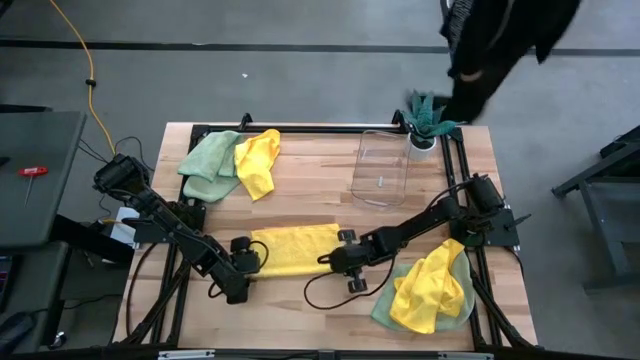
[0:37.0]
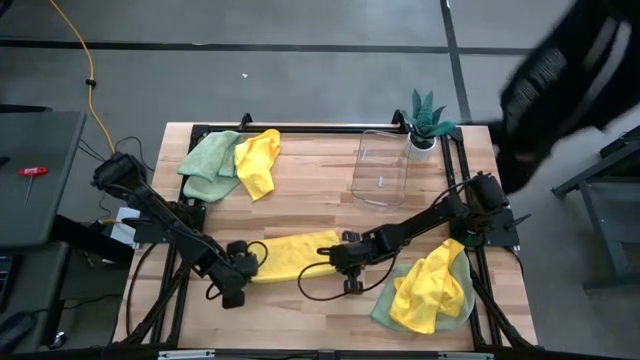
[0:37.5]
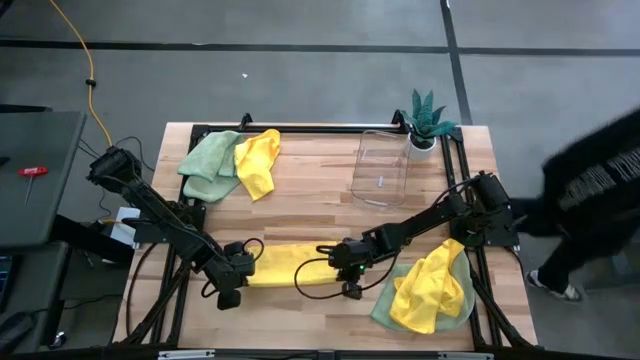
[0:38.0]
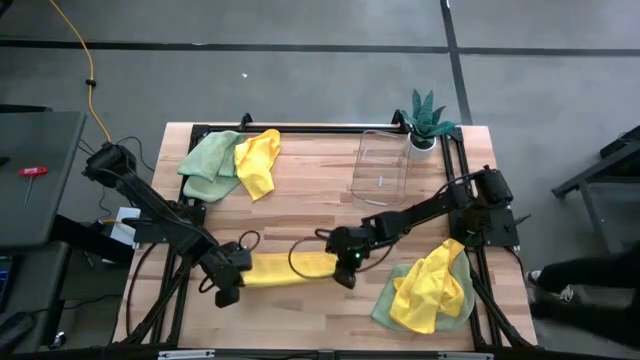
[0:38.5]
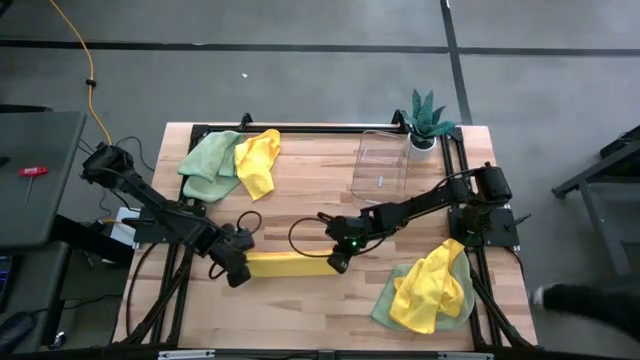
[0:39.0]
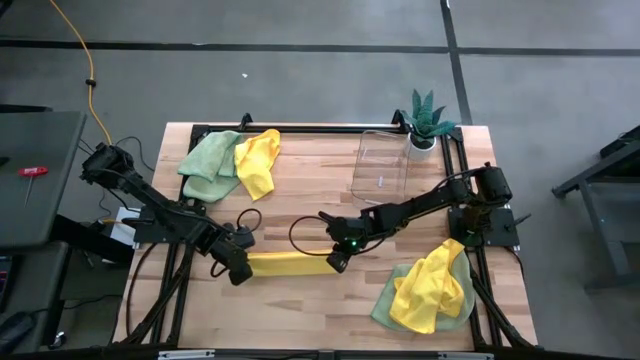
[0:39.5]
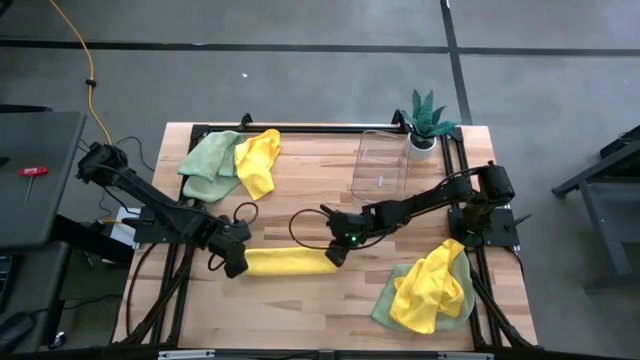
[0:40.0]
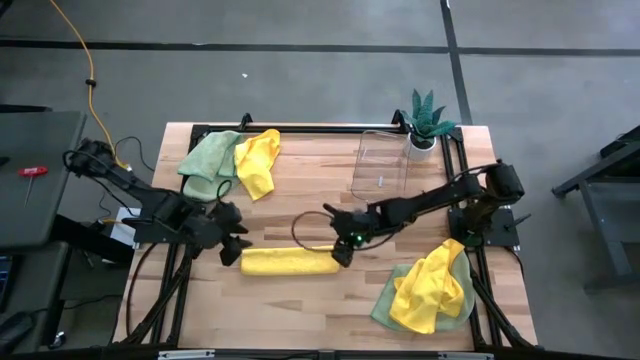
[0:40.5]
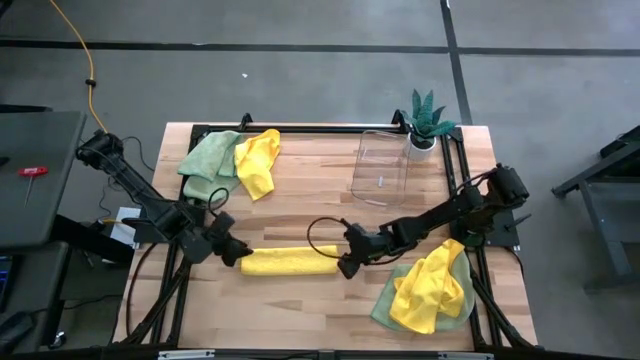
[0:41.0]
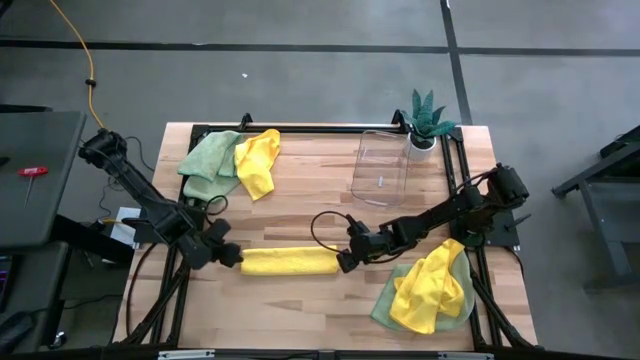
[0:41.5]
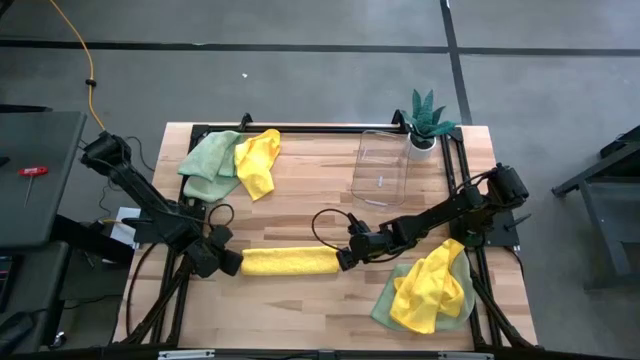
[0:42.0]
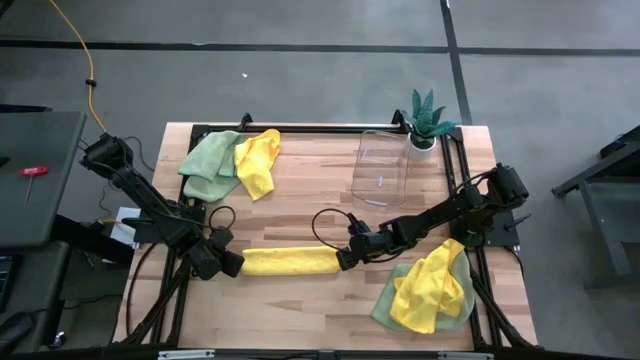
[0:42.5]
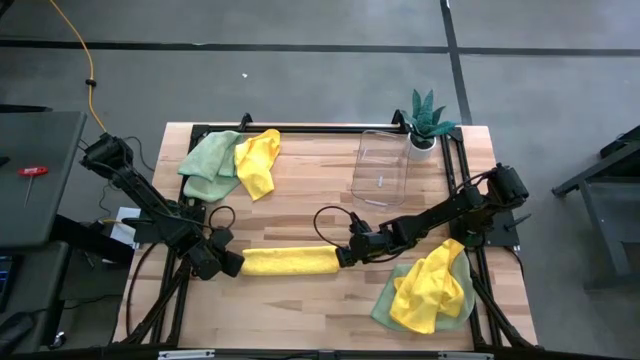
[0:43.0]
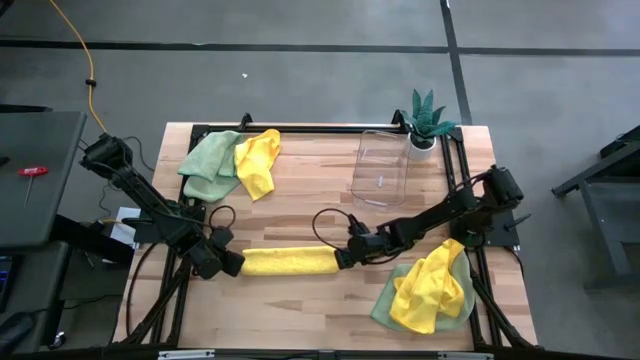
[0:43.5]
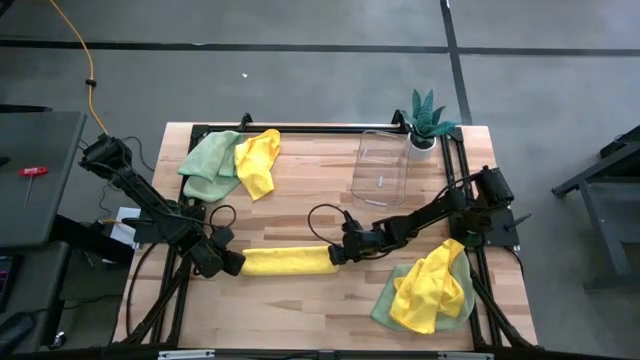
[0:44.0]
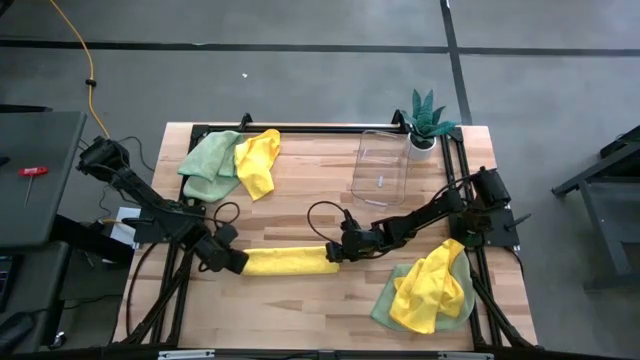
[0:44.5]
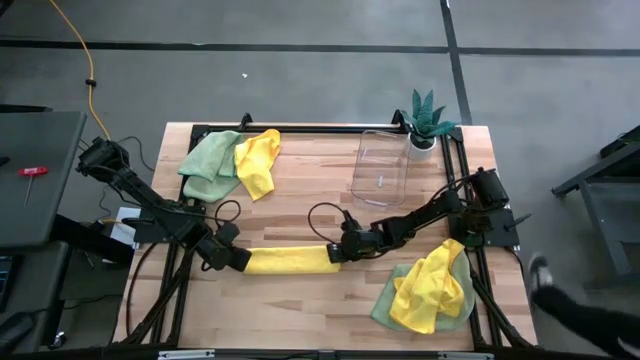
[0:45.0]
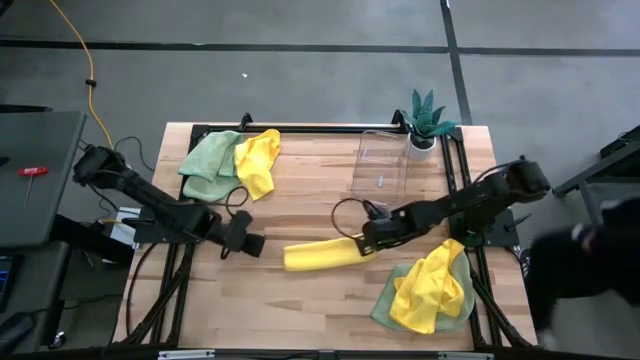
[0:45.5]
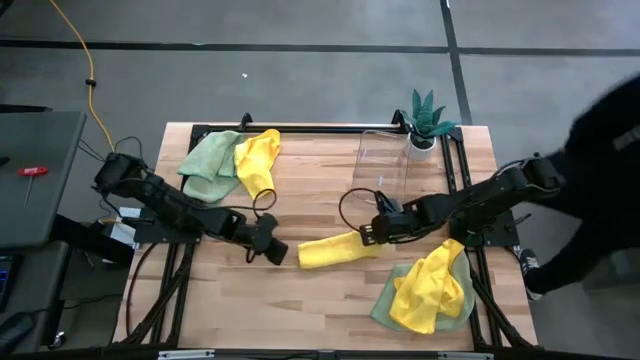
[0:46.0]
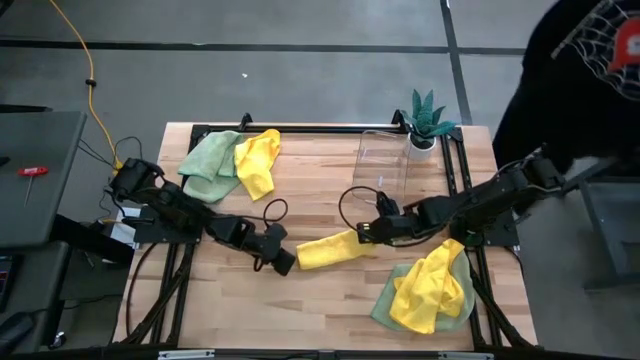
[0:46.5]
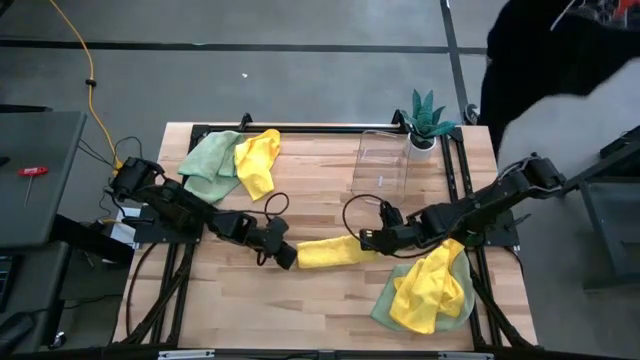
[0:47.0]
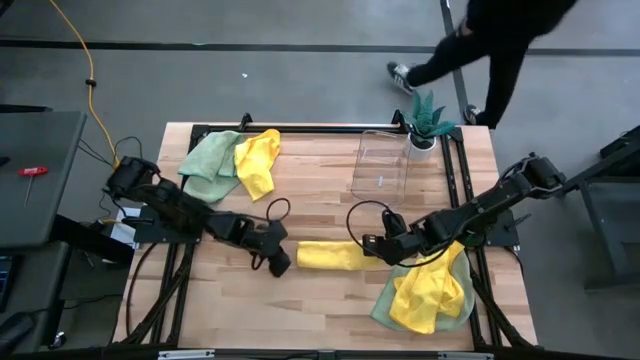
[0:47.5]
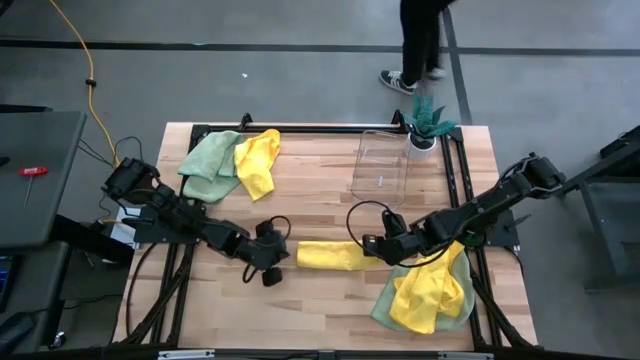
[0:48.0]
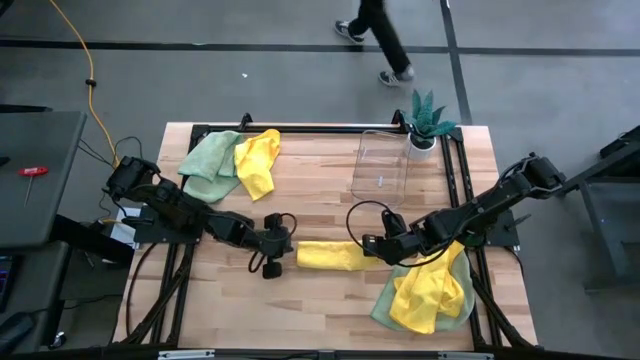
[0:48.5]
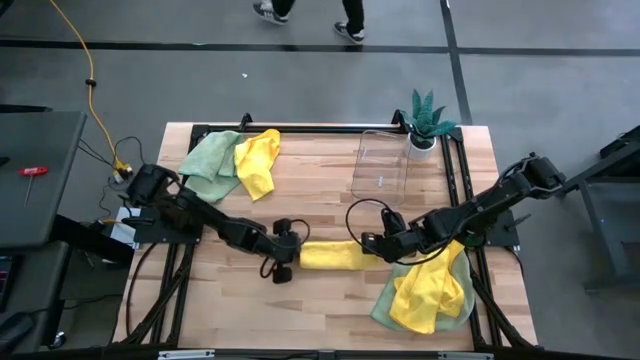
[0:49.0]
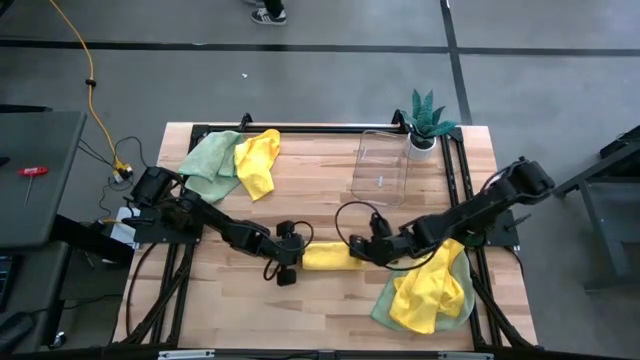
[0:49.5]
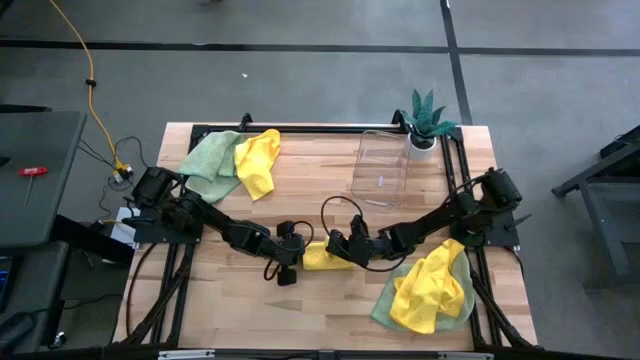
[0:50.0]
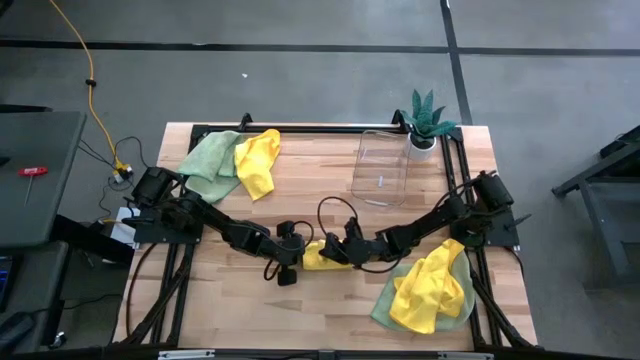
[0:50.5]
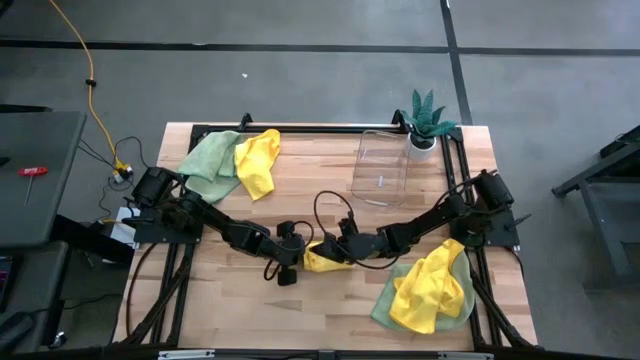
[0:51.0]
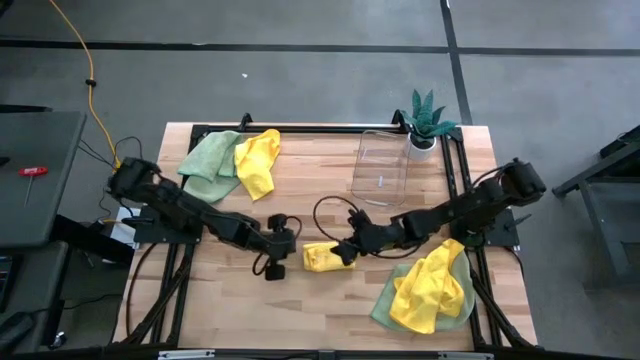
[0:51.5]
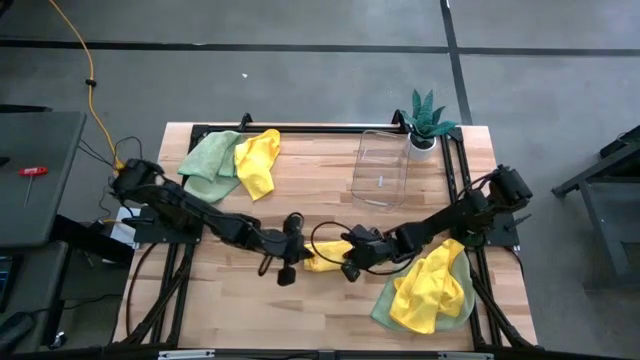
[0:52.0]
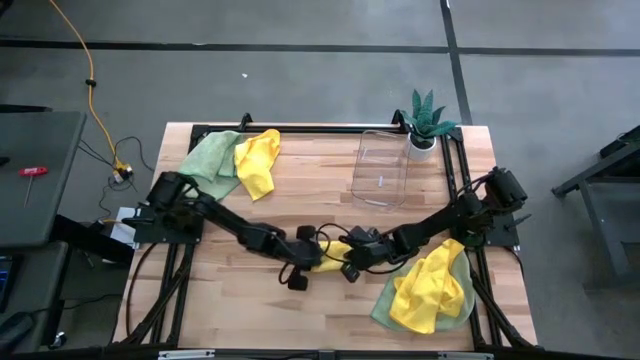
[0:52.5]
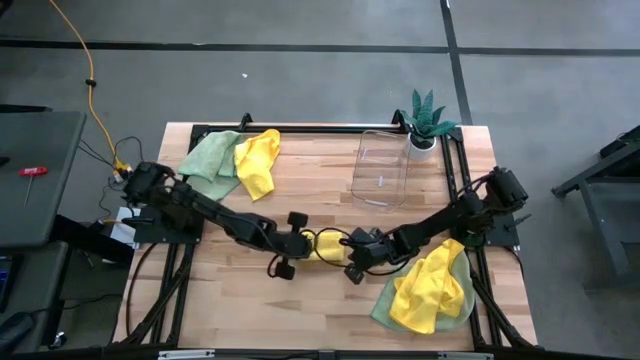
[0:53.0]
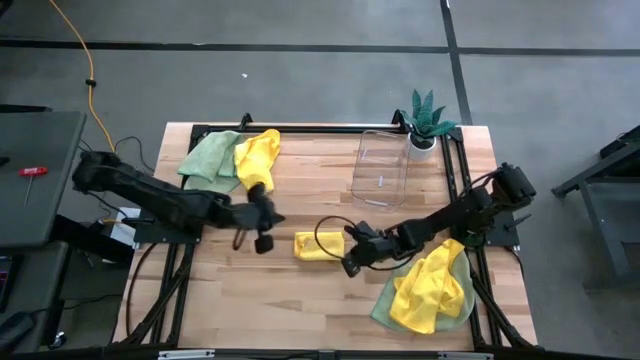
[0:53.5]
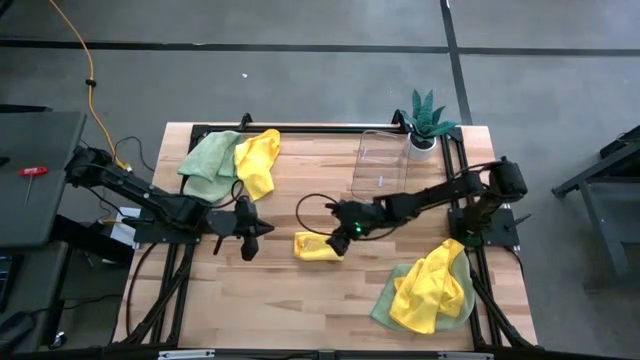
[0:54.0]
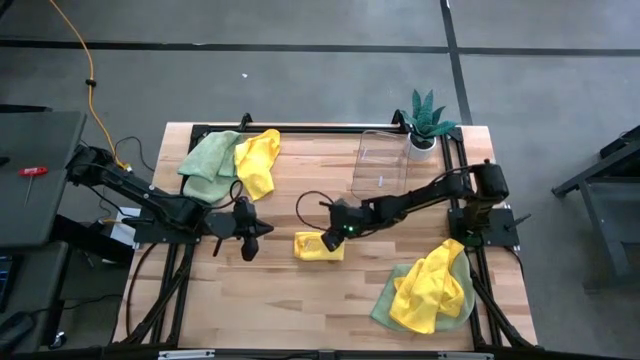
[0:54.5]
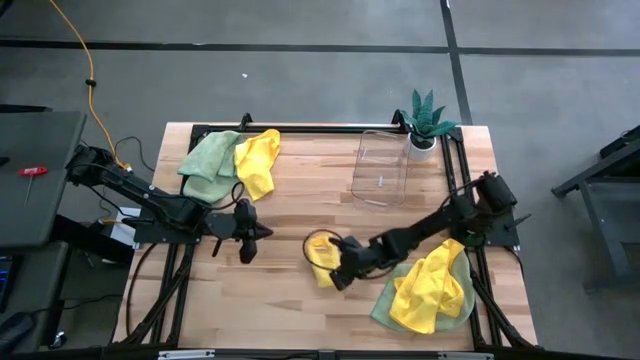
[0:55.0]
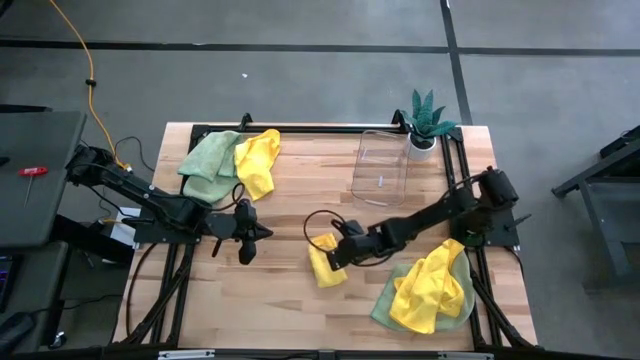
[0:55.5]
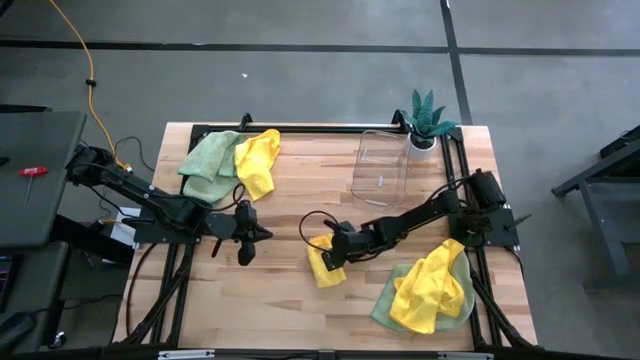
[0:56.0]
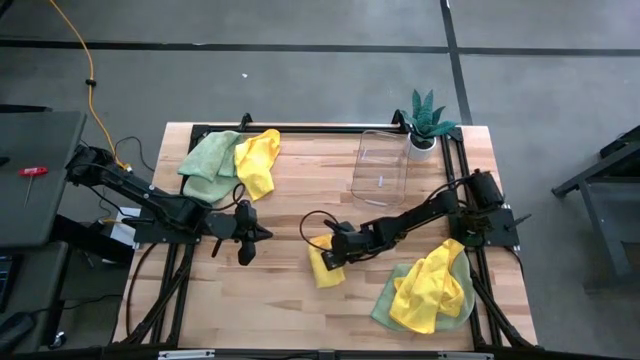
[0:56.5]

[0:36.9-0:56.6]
Task: Fold microfiber towels
Fold the middle yellow microfiber towel
